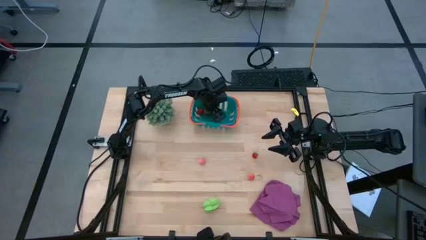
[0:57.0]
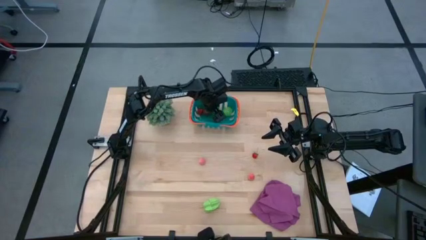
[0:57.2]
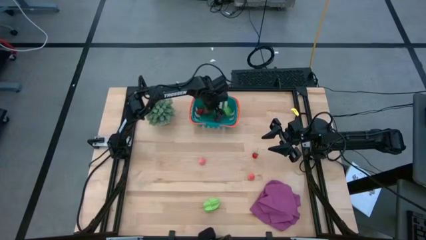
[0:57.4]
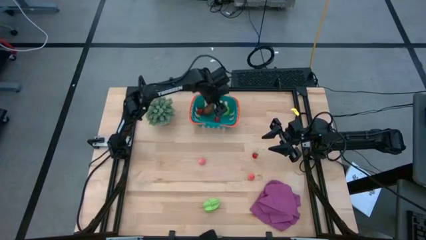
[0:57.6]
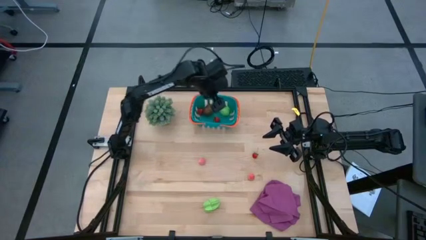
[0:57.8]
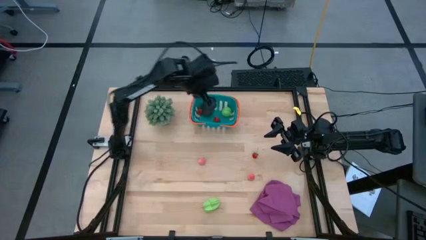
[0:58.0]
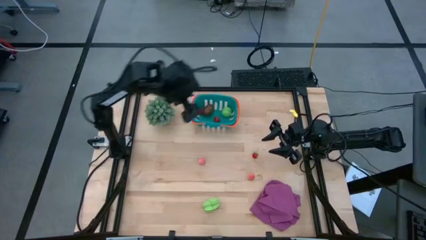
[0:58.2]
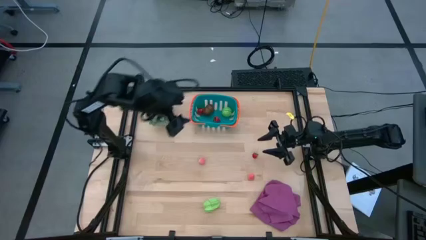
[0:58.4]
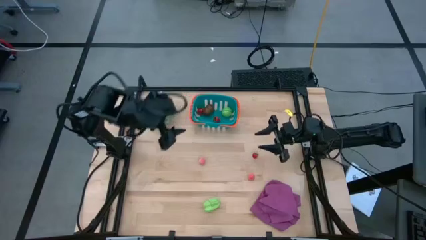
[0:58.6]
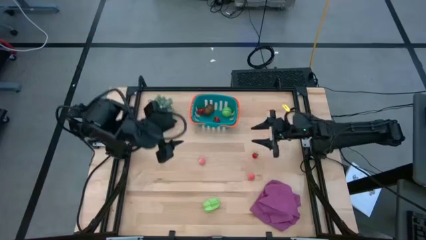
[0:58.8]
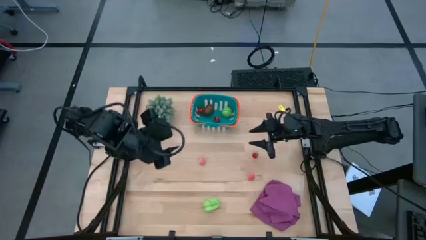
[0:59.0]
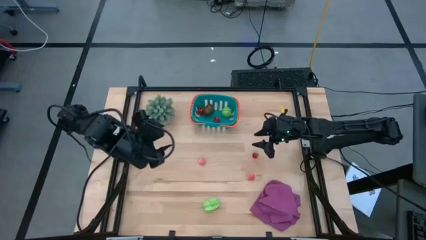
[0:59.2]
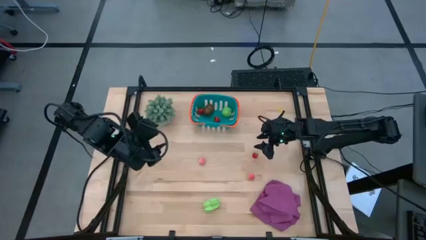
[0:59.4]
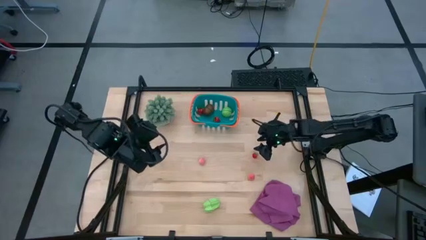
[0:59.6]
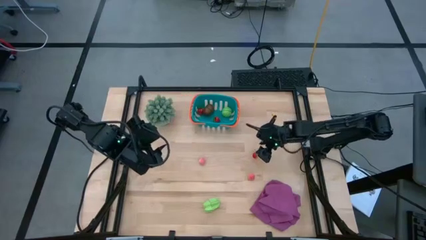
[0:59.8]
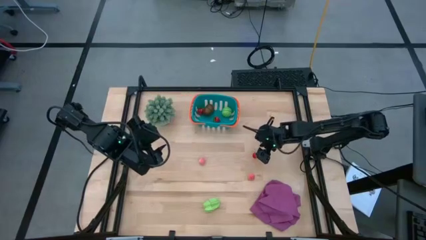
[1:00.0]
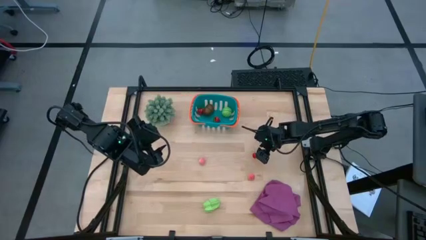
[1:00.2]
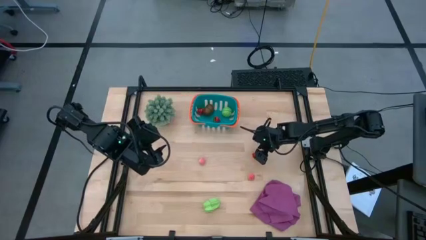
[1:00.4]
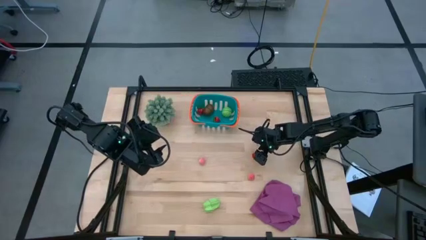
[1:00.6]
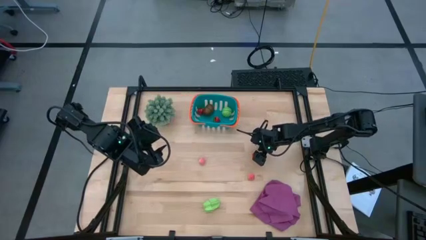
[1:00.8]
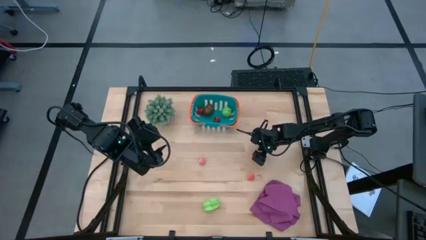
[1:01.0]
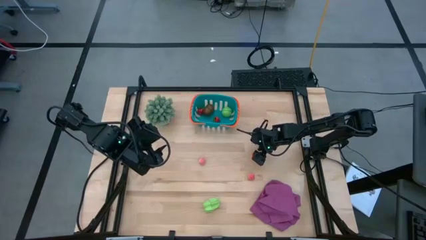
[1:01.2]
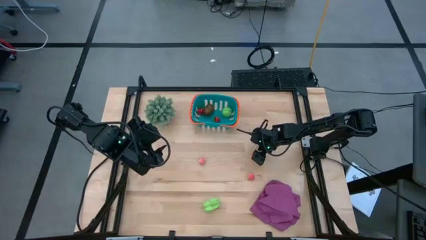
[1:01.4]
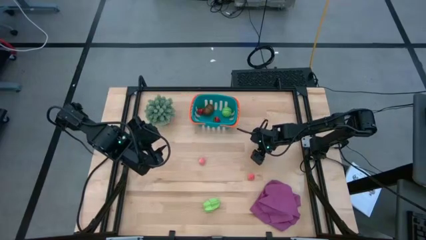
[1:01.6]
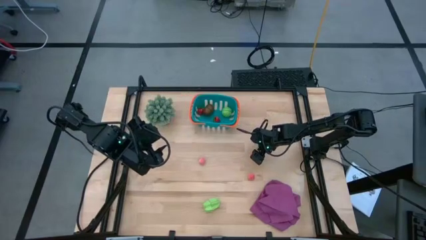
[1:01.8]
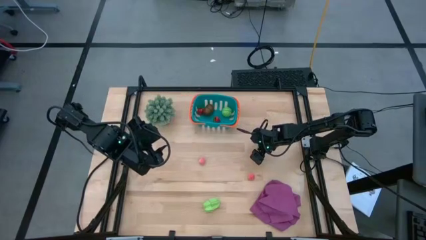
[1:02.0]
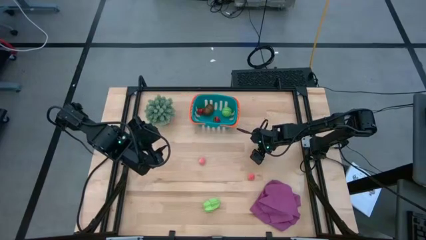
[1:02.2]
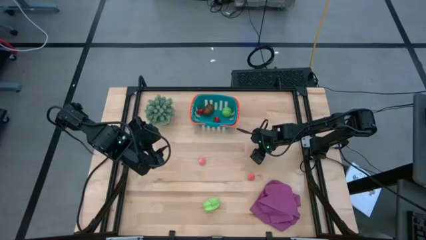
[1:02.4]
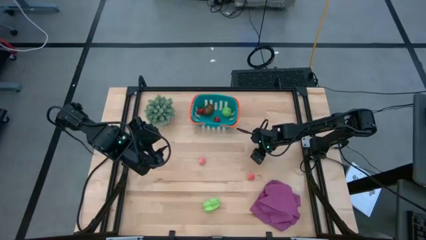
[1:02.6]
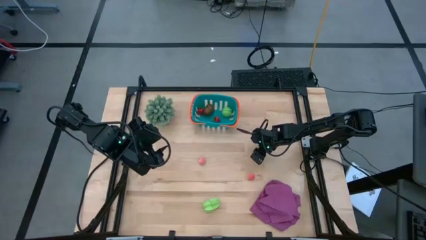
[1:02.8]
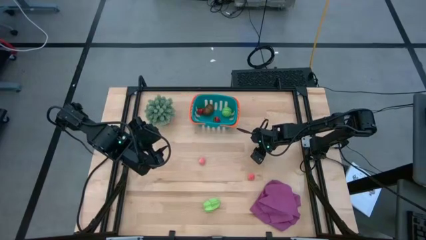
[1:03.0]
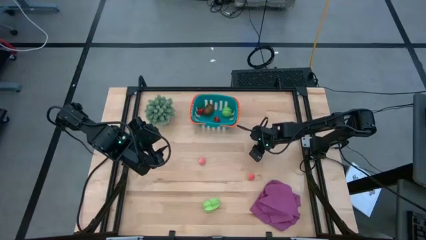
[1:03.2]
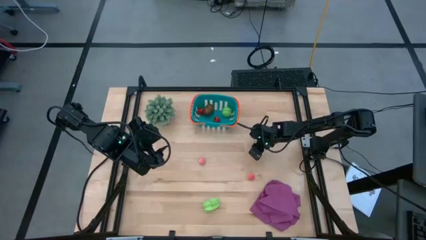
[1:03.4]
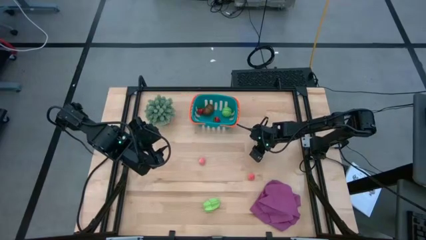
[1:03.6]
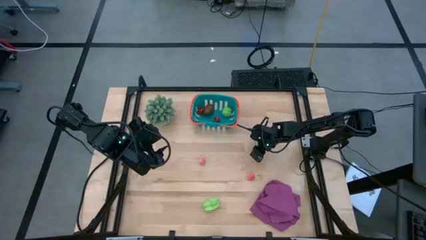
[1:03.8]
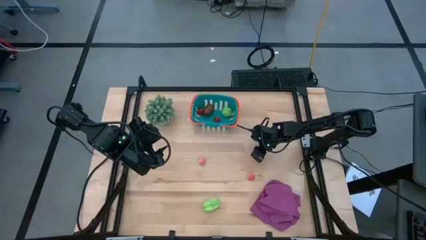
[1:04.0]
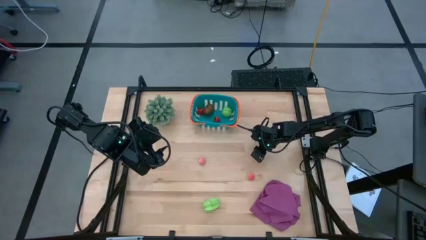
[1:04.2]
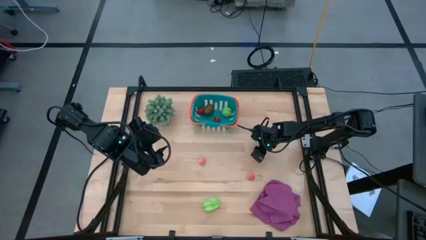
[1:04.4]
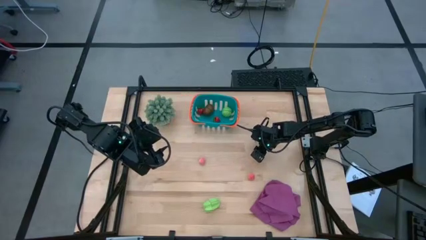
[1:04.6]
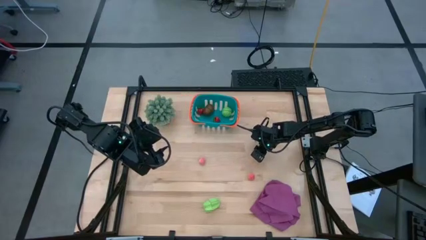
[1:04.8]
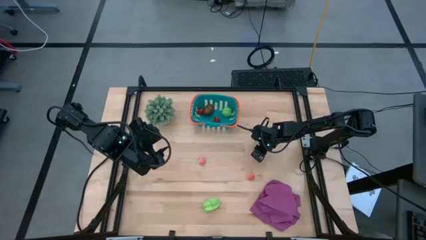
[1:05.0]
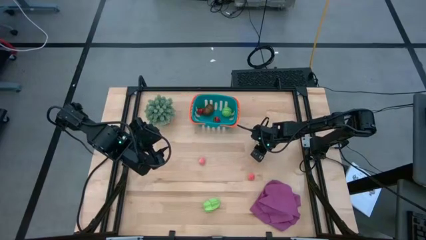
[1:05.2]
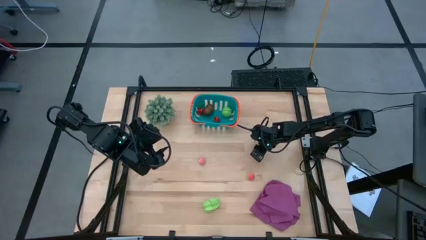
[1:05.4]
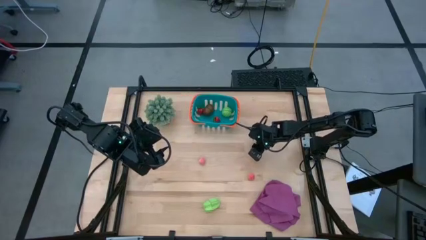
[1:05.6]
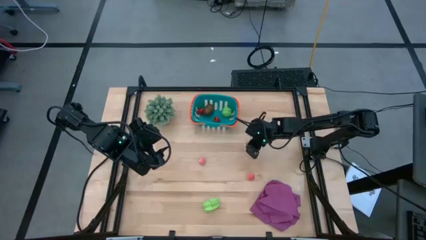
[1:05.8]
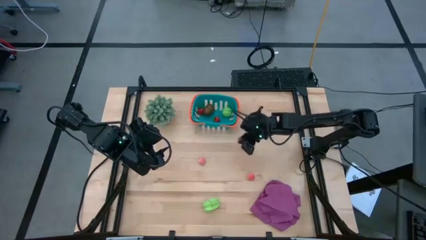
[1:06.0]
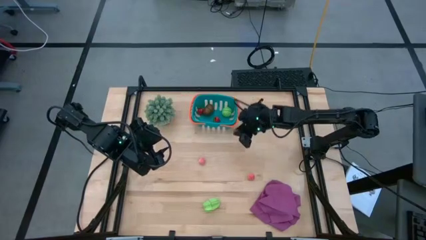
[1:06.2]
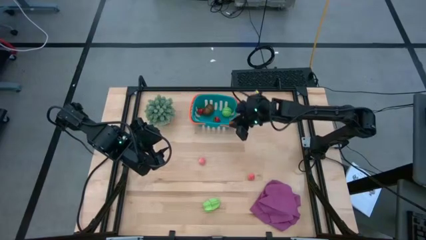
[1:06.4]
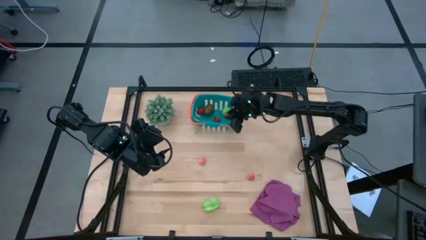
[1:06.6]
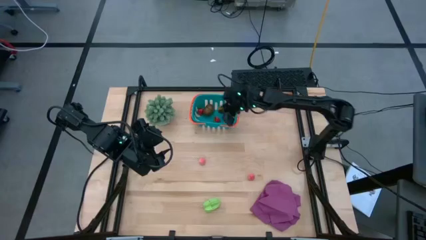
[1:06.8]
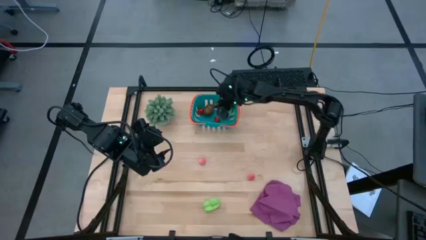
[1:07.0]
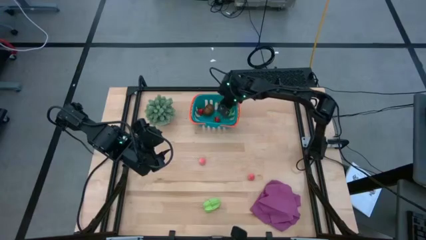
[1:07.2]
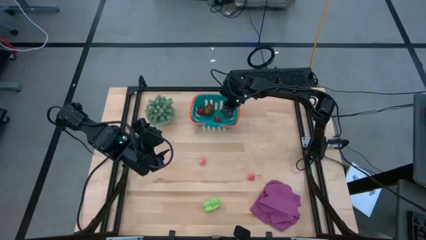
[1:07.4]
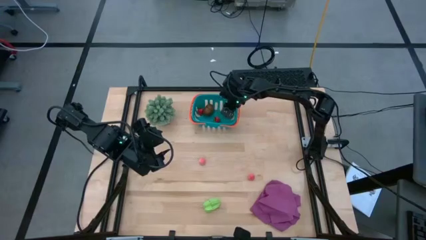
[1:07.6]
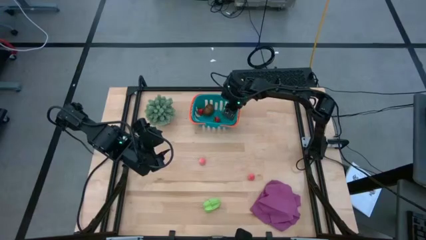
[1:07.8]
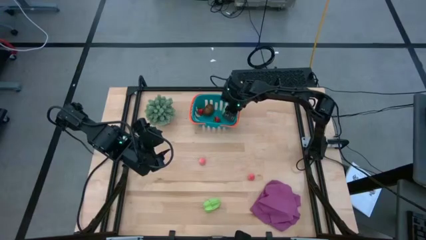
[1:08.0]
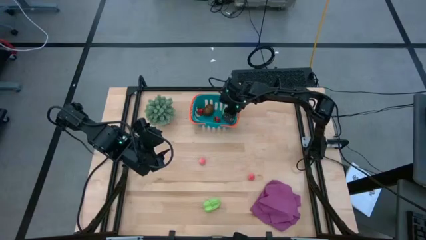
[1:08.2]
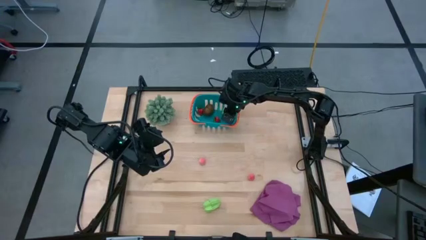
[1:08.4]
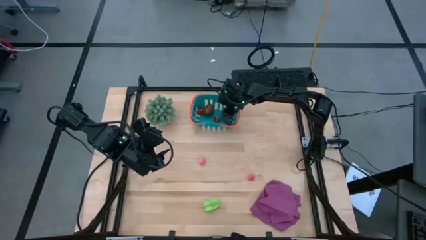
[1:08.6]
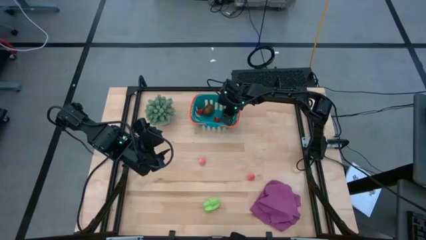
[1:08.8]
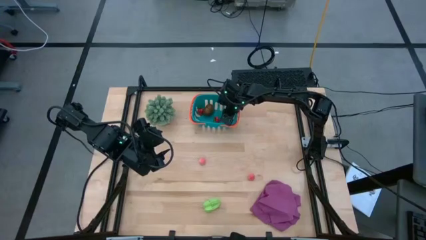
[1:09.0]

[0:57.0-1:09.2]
Task: Pick and placing Produce into tupperware
Put the red strawberry into the blue basket
